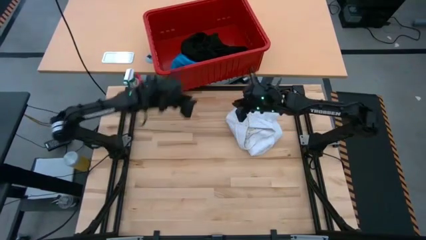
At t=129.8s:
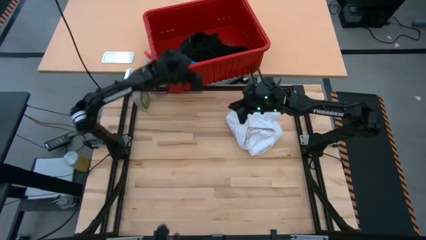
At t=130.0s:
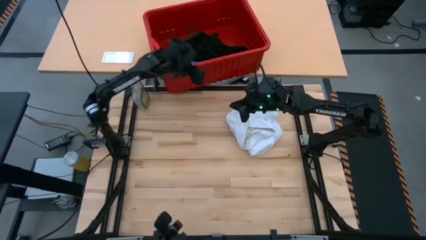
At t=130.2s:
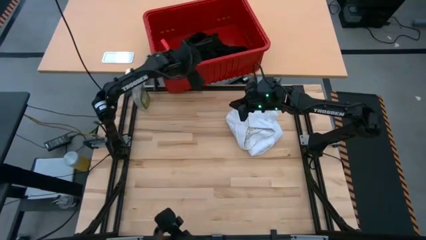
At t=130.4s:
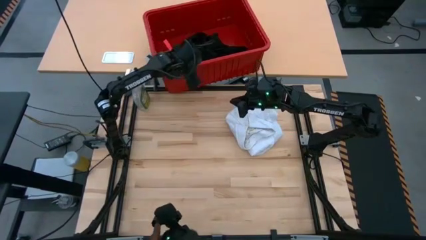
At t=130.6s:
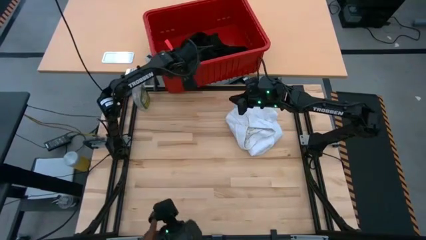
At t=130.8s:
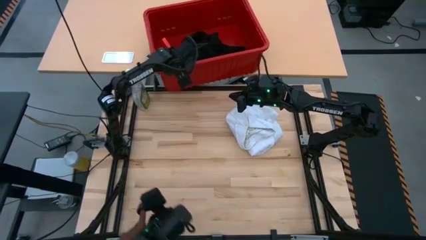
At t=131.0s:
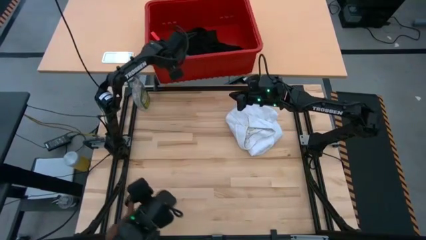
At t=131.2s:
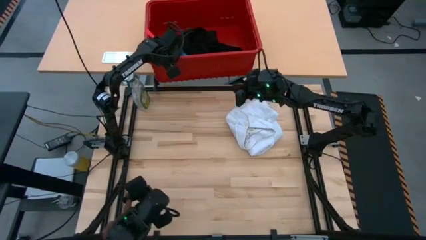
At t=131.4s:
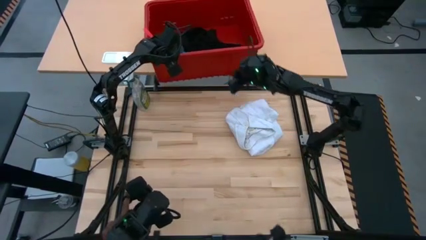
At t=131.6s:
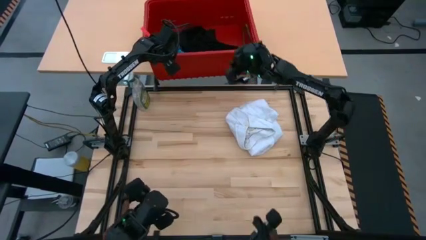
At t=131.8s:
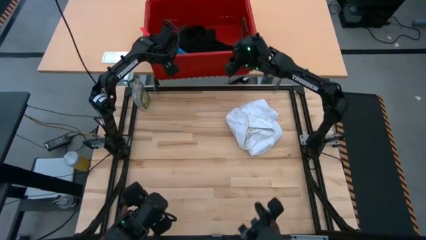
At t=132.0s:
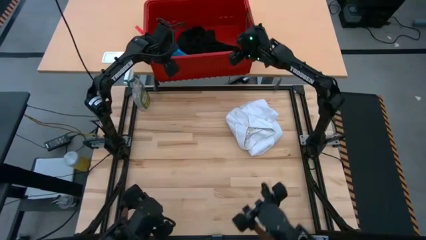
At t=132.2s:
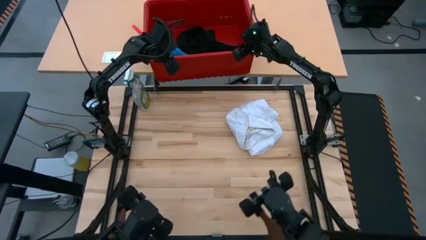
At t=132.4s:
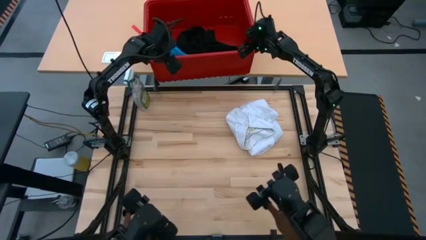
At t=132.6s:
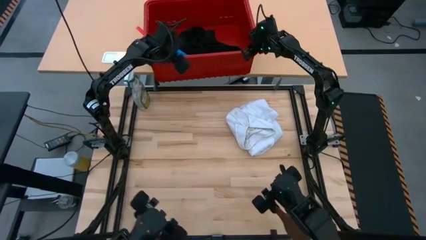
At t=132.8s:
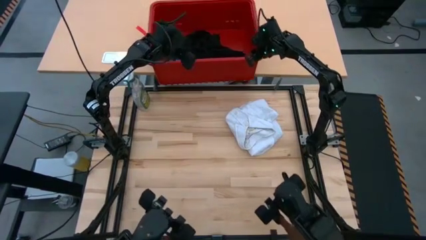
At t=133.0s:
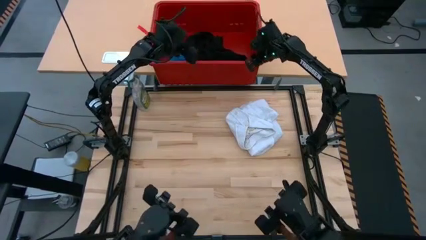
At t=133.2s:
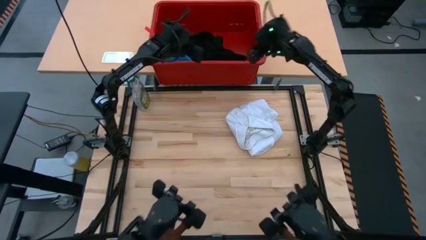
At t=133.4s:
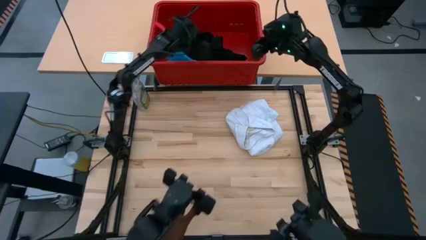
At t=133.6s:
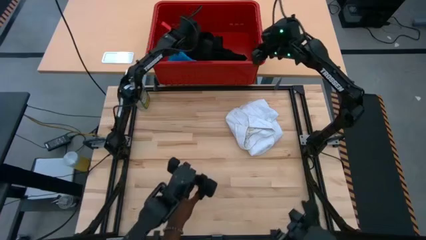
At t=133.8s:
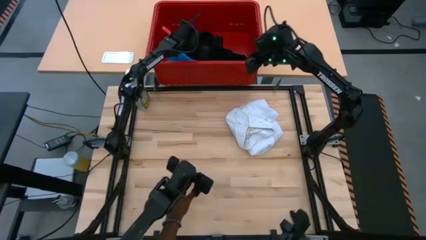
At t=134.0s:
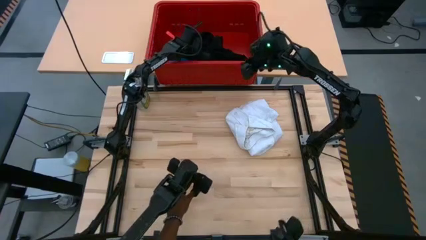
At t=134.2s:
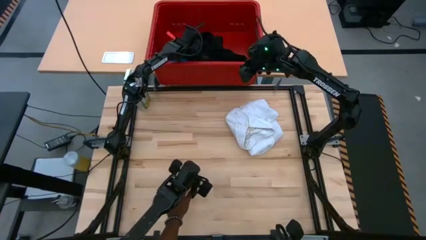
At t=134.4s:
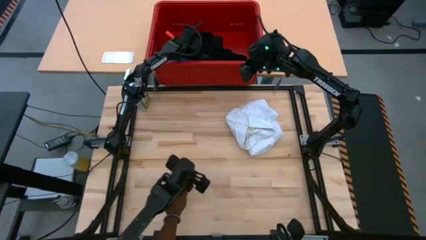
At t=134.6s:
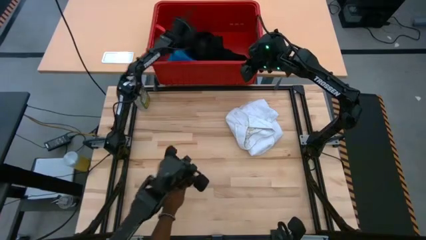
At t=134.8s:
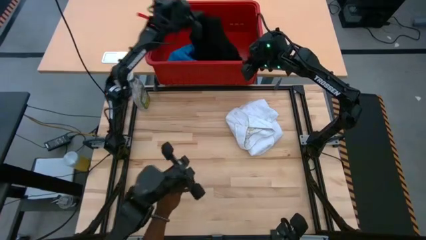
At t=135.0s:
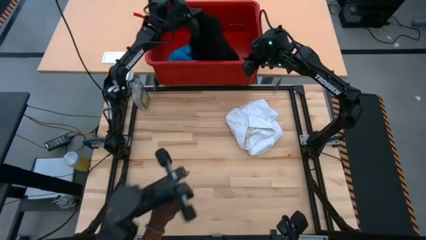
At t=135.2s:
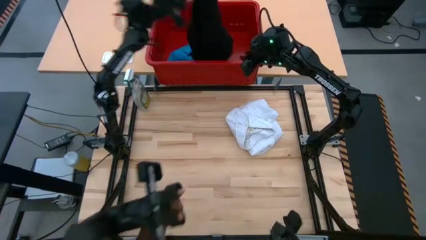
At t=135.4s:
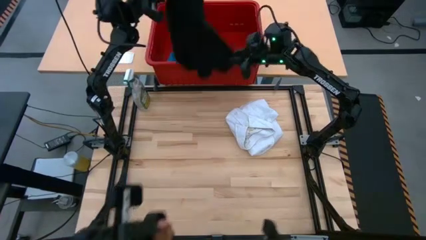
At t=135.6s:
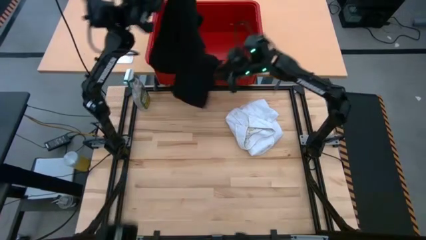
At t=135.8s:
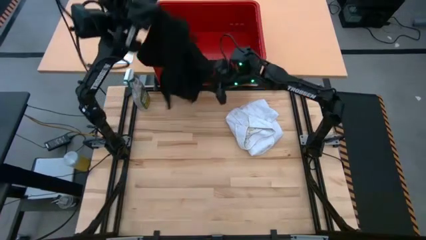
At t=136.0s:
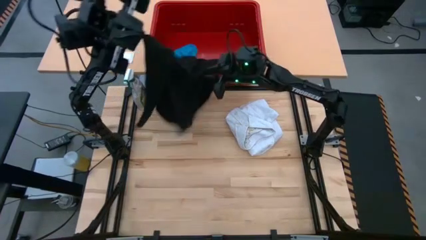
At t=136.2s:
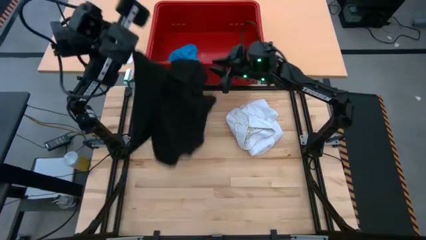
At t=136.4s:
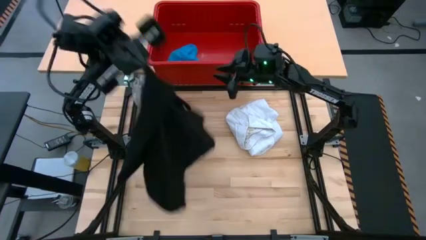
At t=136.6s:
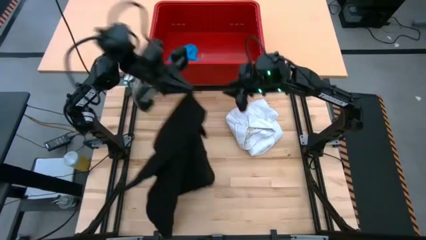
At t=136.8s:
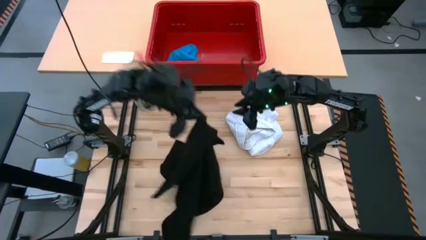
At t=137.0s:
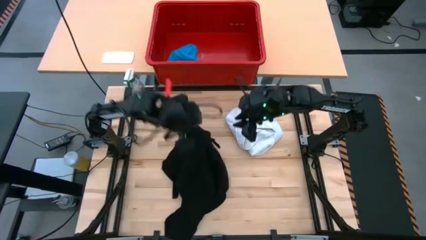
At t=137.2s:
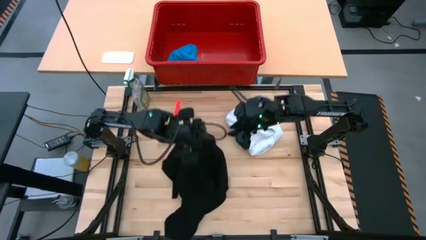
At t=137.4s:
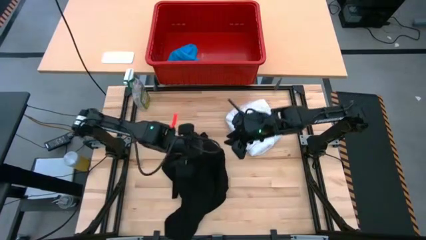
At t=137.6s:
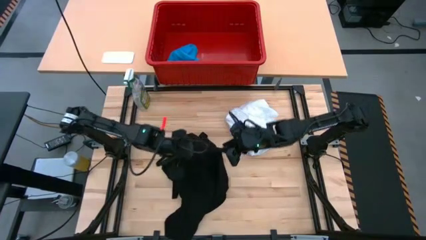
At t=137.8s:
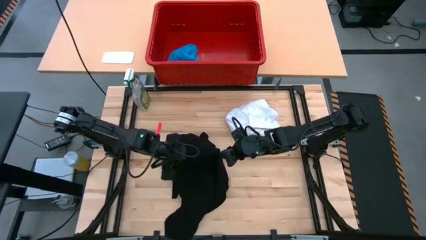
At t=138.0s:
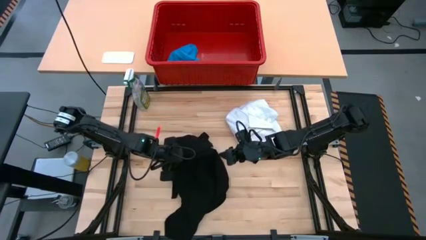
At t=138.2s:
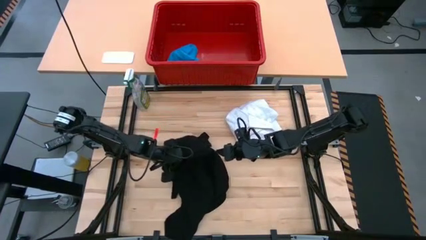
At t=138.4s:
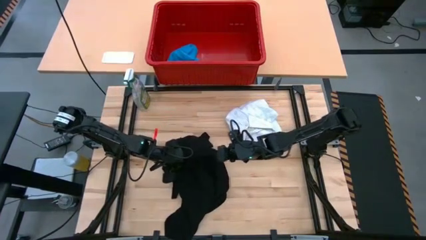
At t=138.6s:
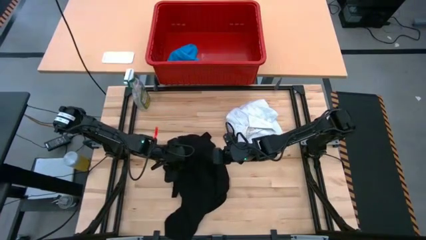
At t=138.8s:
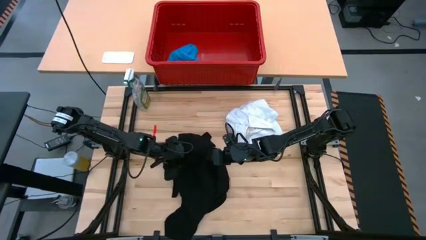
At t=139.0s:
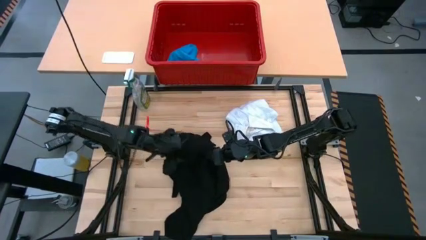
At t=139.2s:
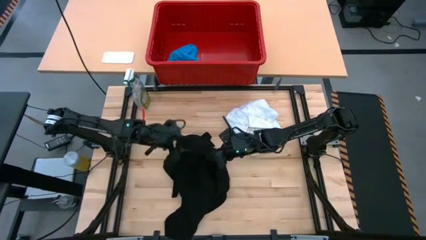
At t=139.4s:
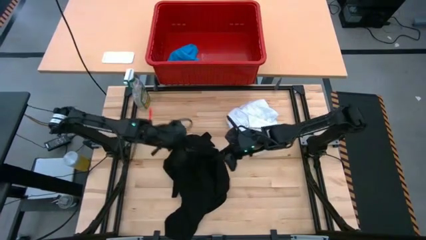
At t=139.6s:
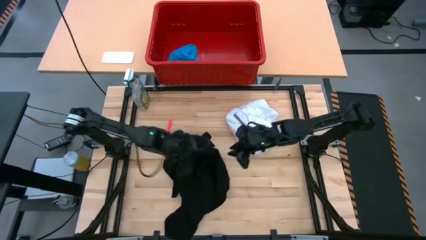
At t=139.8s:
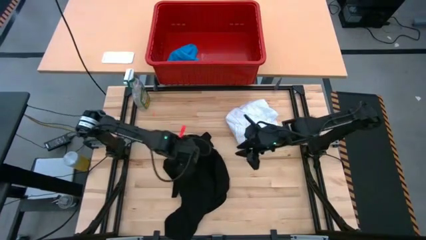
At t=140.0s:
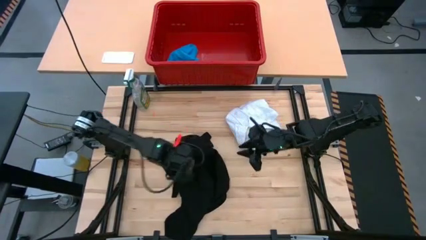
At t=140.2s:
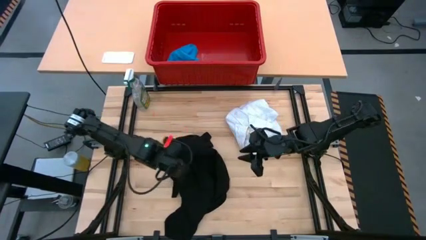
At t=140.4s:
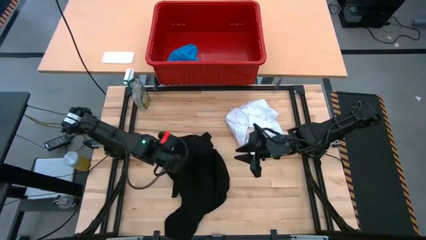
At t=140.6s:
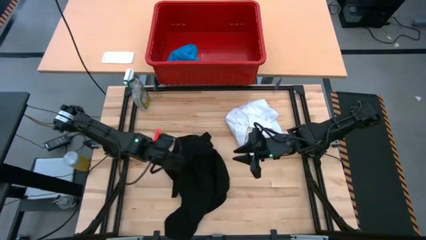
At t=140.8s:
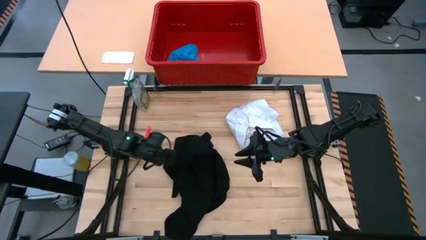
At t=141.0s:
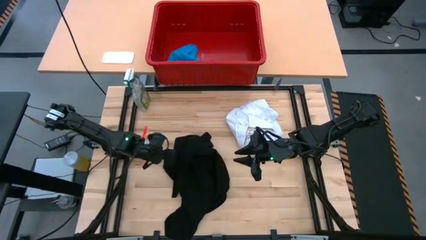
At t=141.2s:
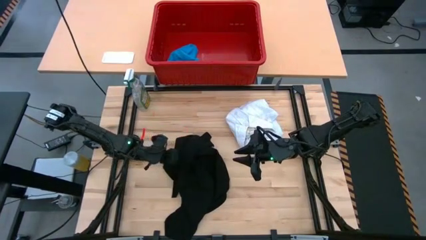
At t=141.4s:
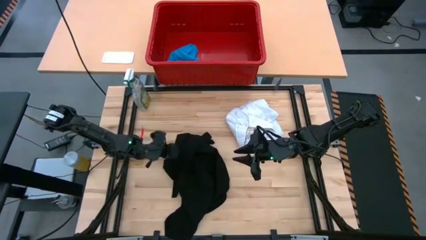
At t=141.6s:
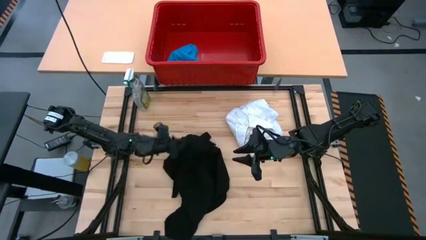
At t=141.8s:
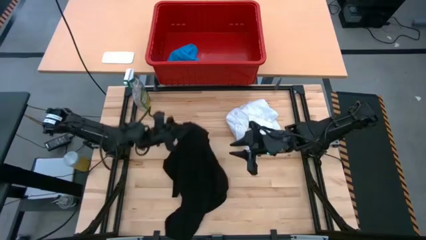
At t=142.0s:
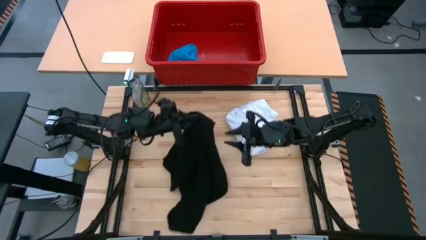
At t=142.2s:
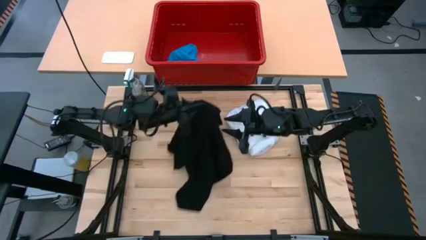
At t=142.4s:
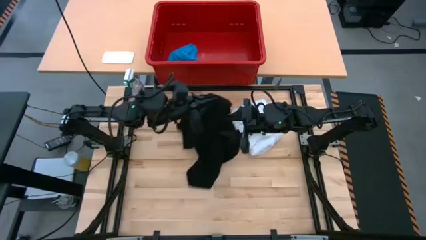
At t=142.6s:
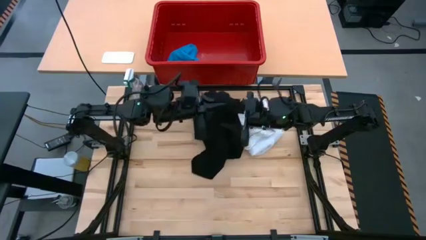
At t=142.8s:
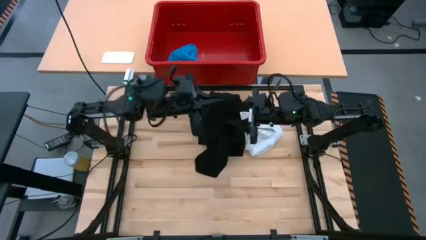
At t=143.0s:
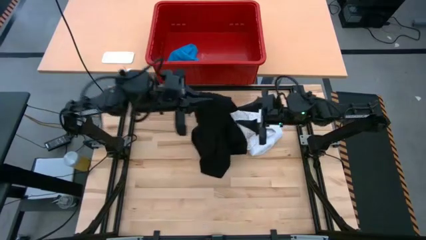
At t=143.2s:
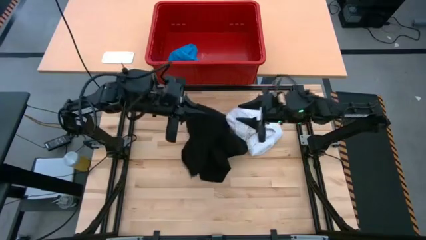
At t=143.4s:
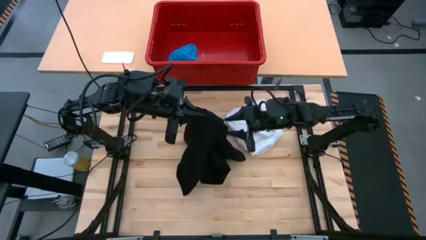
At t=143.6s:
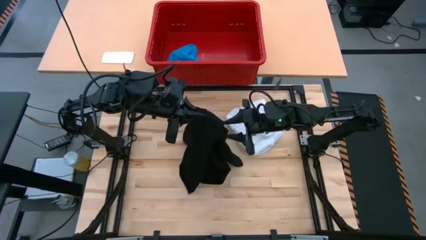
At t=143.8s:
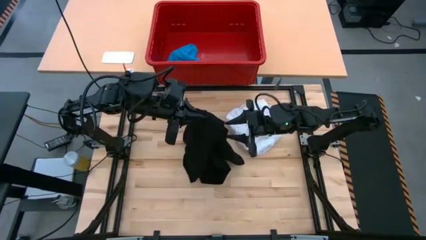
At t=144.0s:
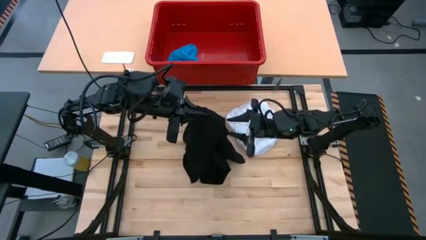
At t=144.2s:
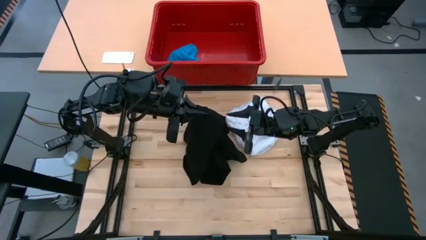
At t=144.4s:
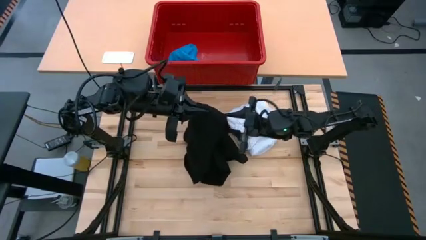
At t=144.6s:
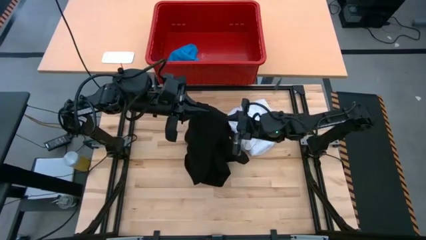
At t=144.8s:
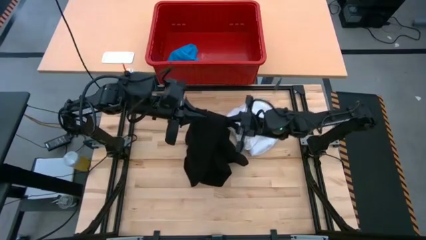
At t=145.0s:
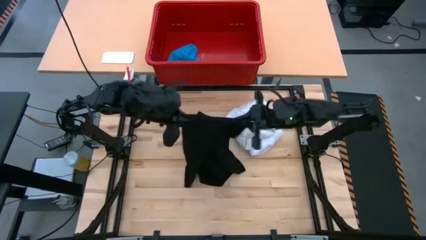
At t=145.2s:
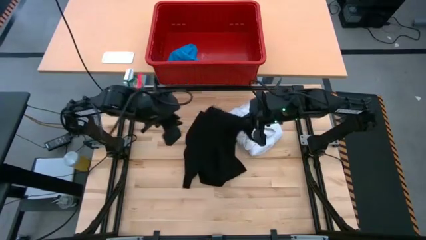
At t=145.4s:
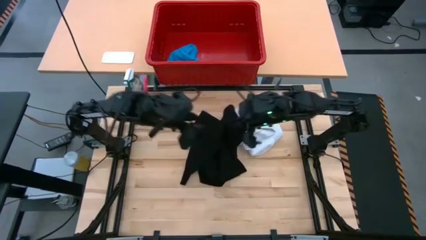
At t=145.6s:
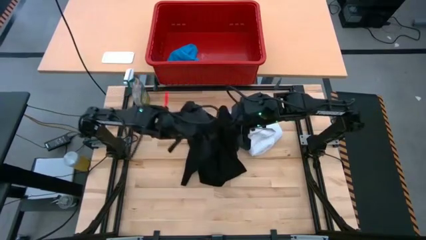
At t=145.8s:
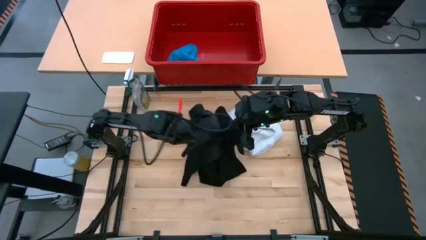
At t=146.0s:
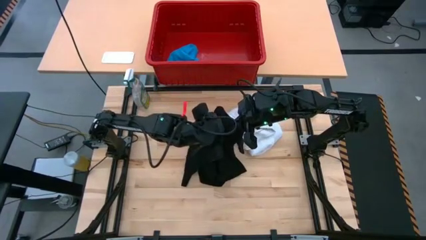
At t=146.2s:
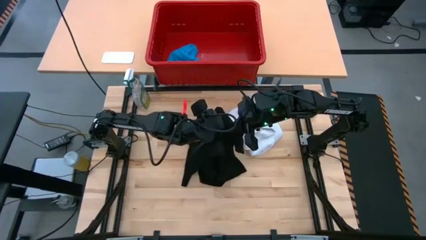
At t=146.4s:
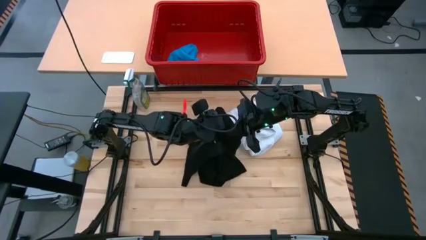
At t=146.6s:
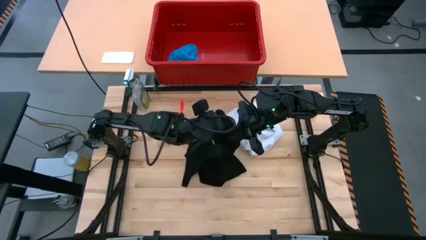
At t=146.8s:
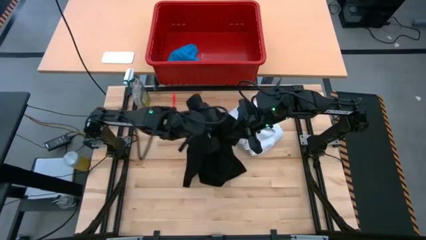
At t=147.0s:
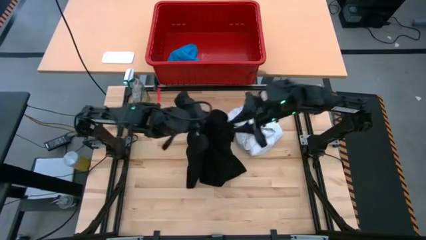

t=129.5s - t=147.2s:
Task: Fold laundry
Fold the black shirt
